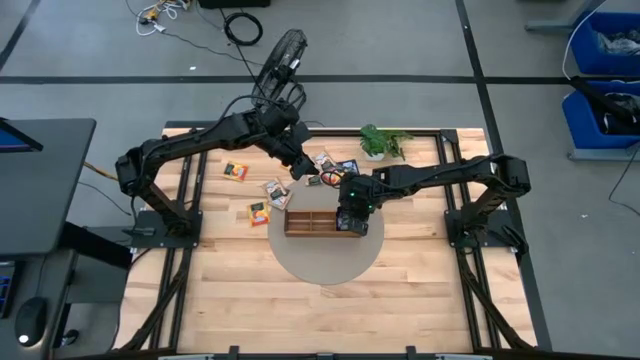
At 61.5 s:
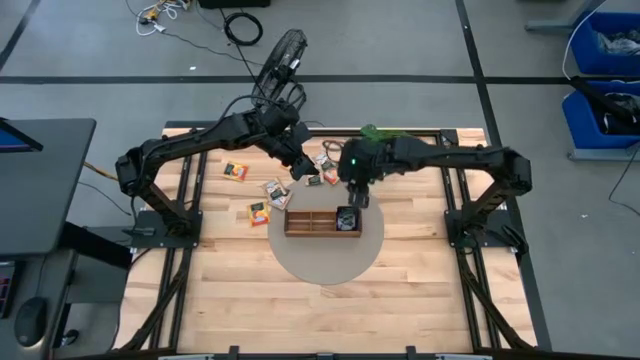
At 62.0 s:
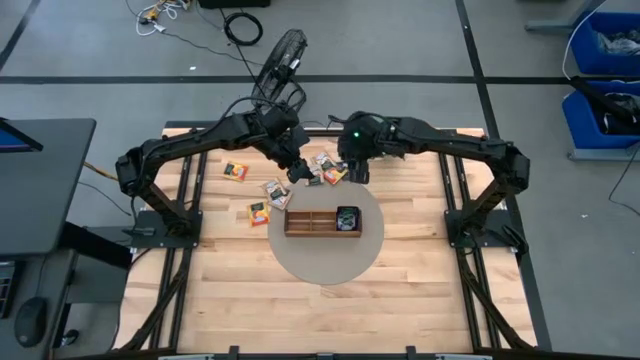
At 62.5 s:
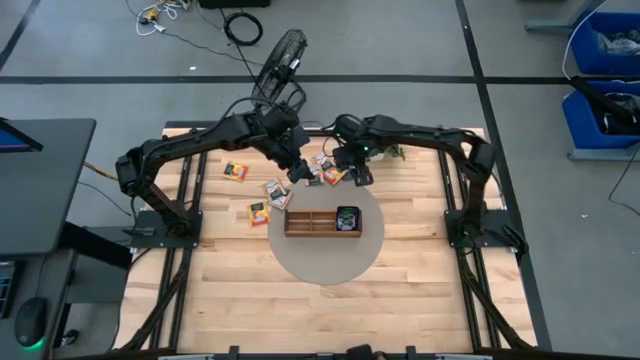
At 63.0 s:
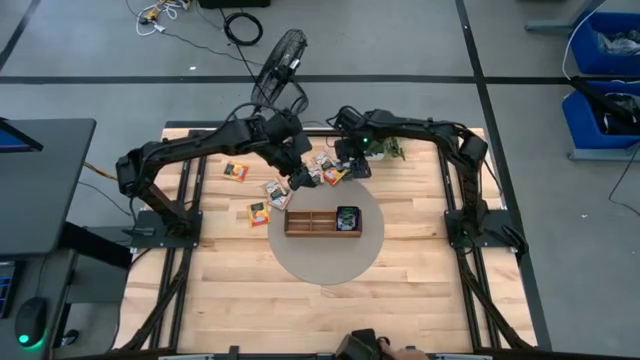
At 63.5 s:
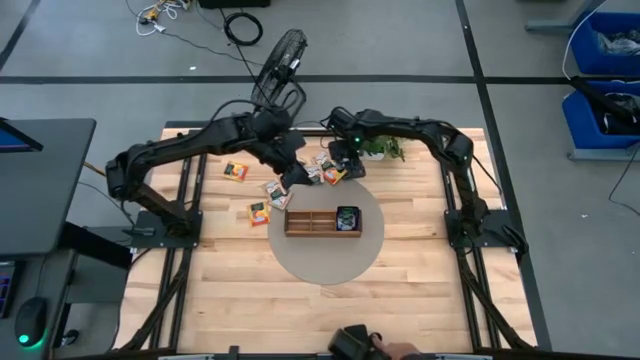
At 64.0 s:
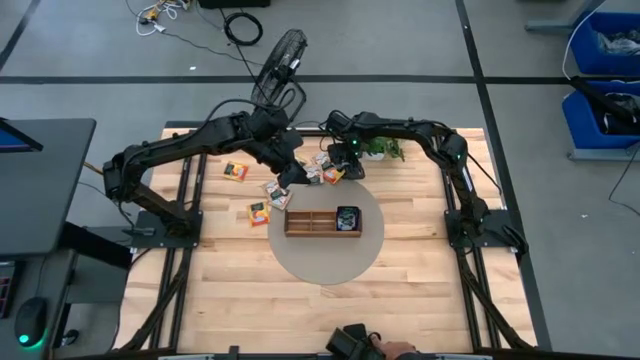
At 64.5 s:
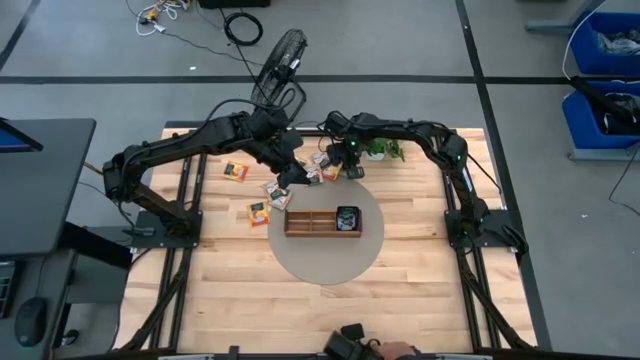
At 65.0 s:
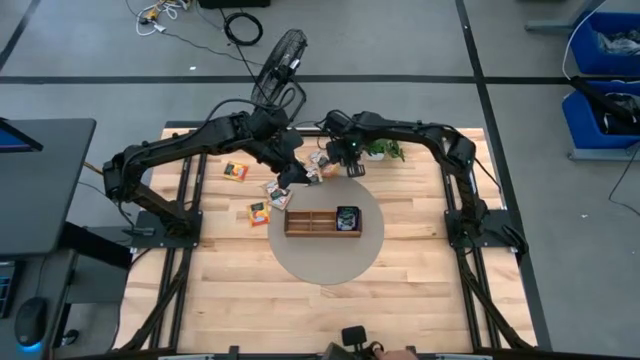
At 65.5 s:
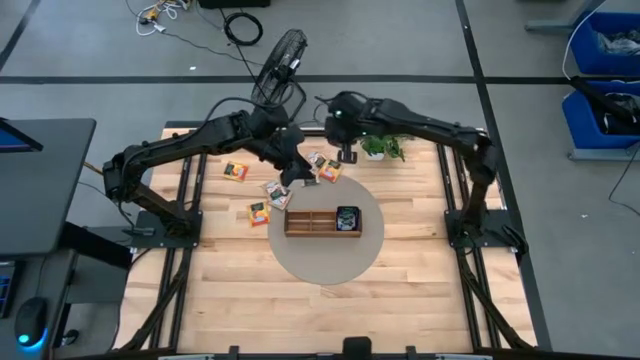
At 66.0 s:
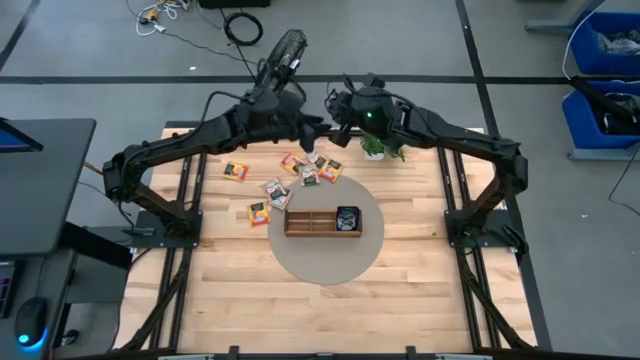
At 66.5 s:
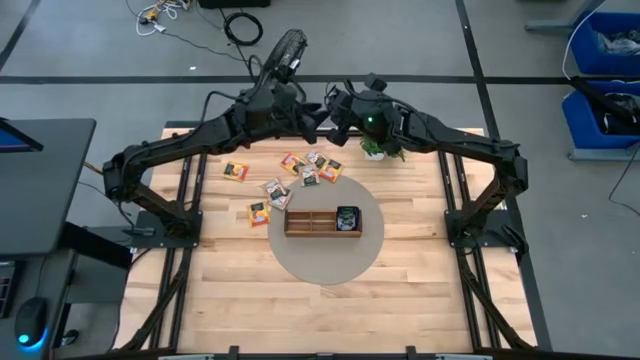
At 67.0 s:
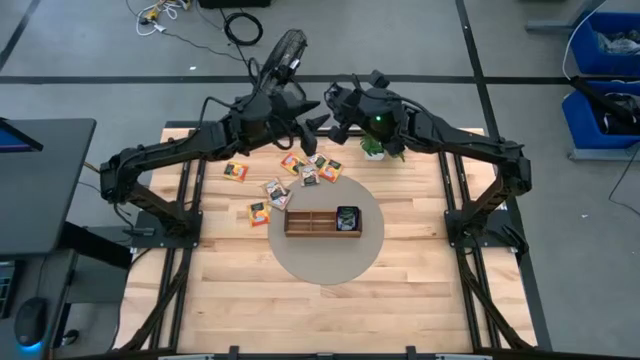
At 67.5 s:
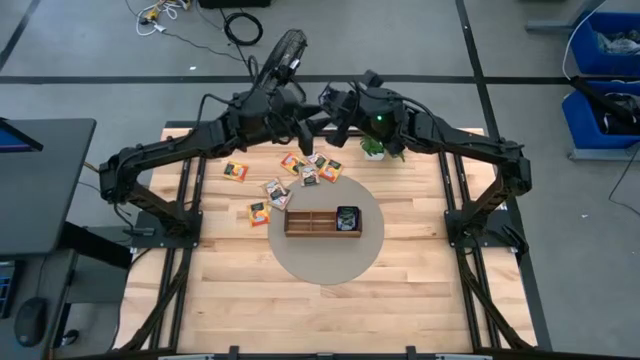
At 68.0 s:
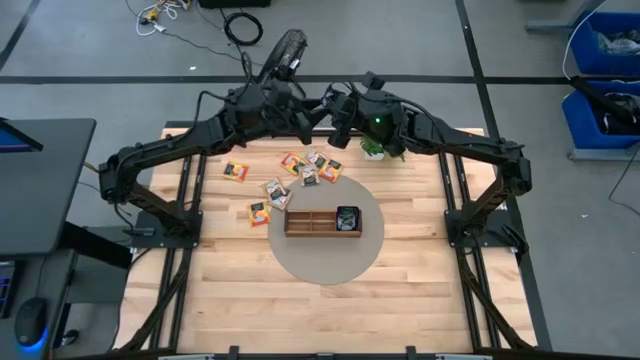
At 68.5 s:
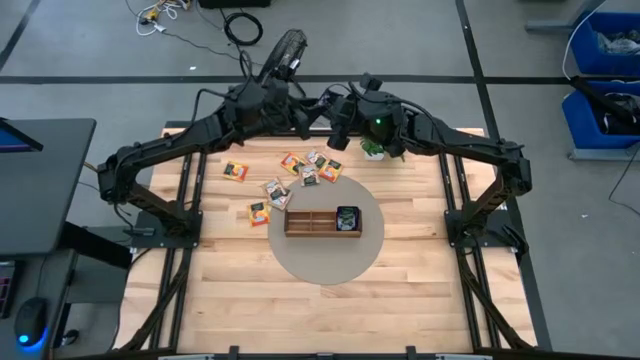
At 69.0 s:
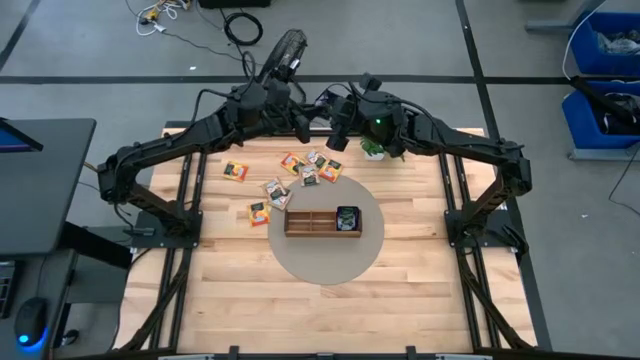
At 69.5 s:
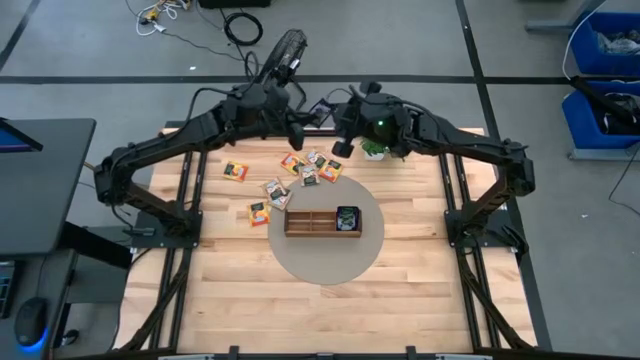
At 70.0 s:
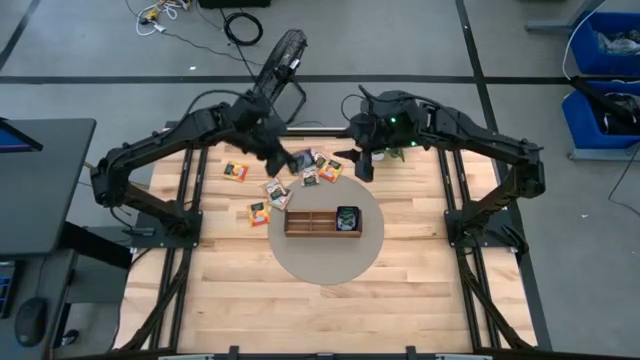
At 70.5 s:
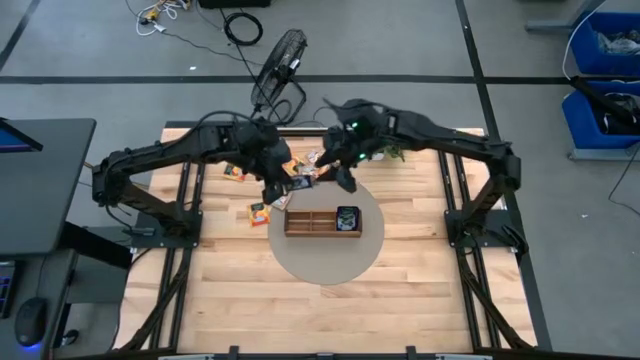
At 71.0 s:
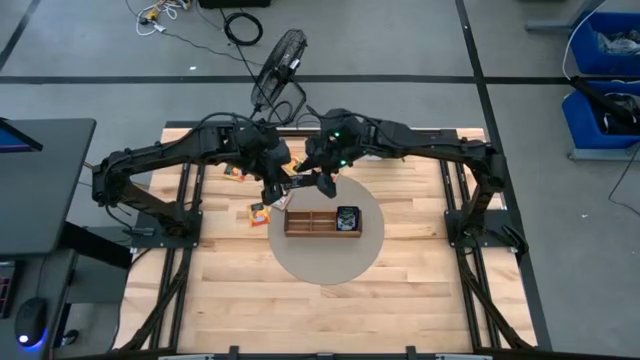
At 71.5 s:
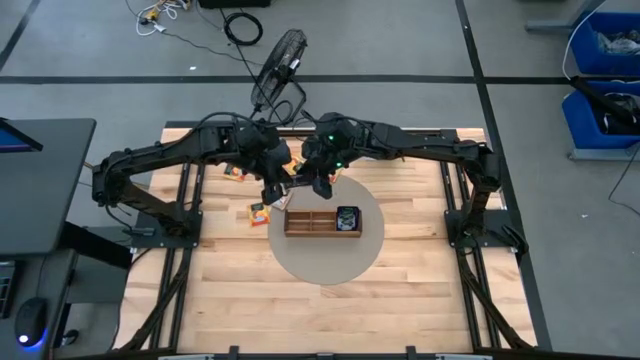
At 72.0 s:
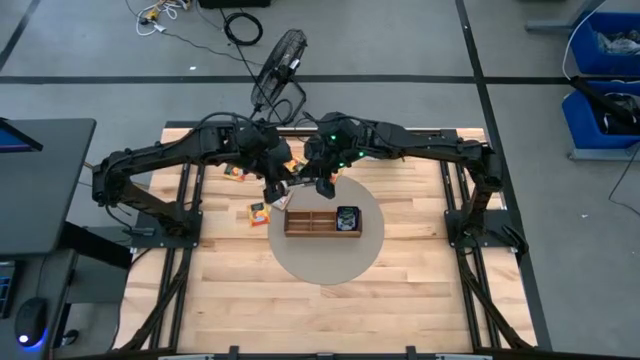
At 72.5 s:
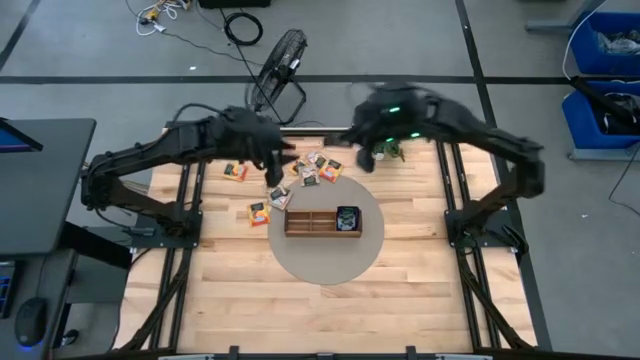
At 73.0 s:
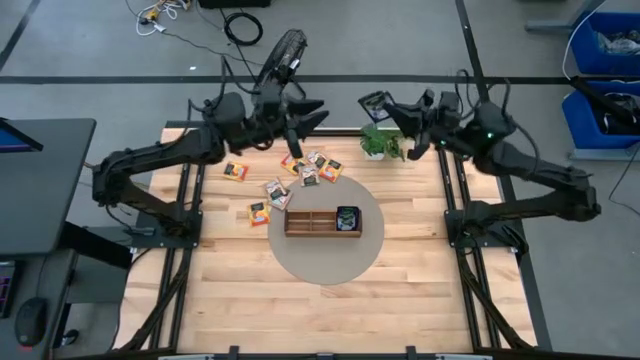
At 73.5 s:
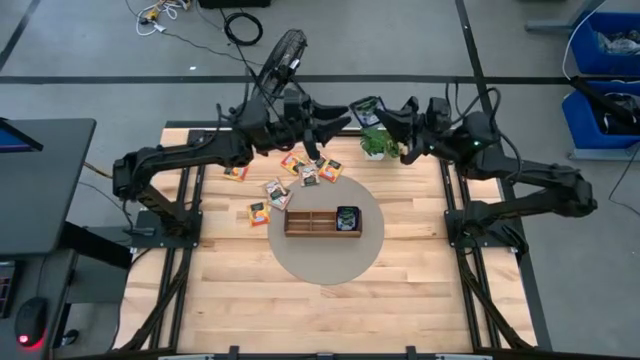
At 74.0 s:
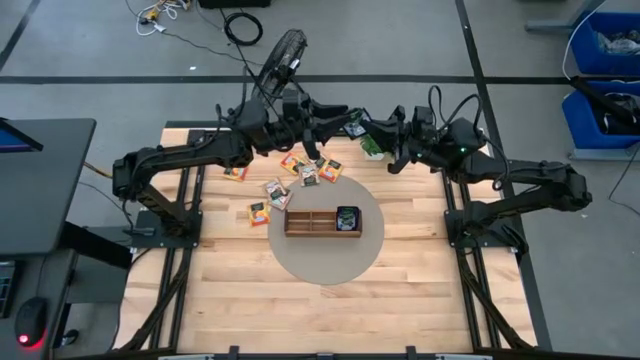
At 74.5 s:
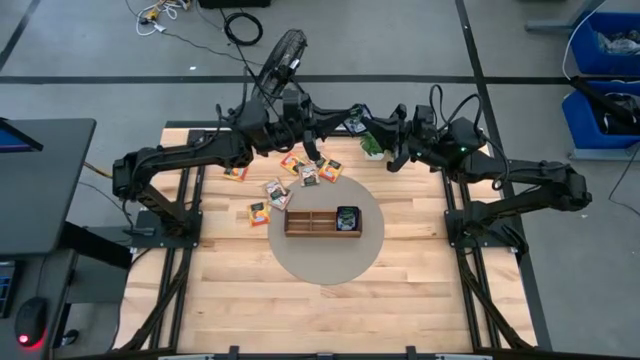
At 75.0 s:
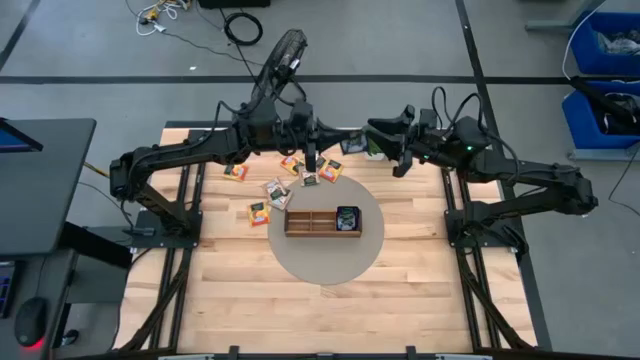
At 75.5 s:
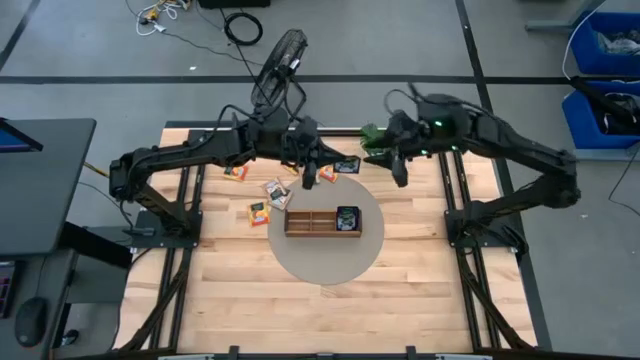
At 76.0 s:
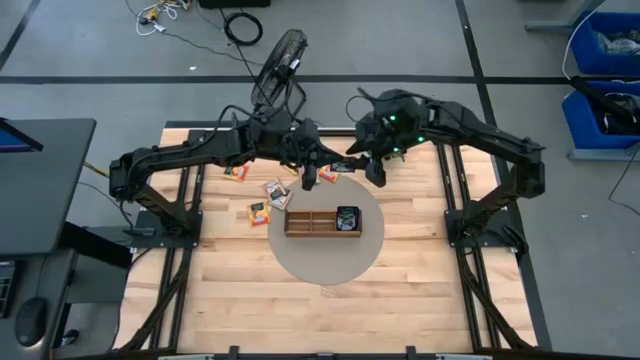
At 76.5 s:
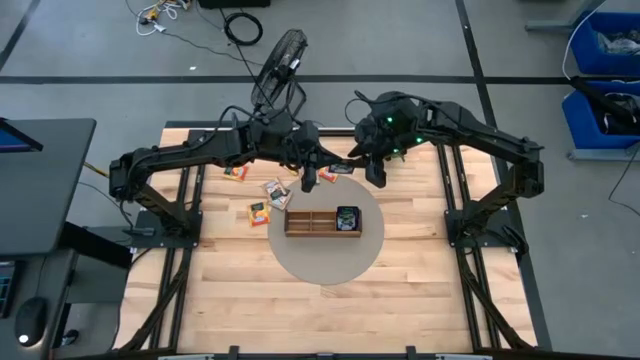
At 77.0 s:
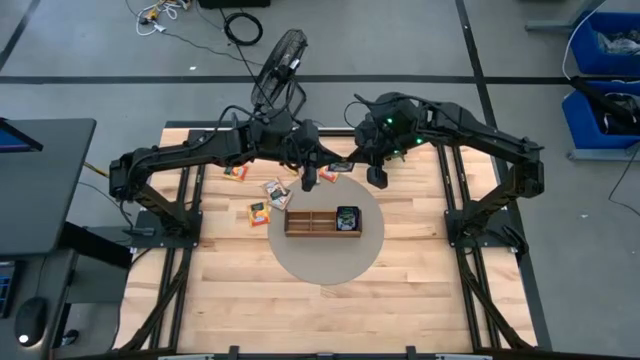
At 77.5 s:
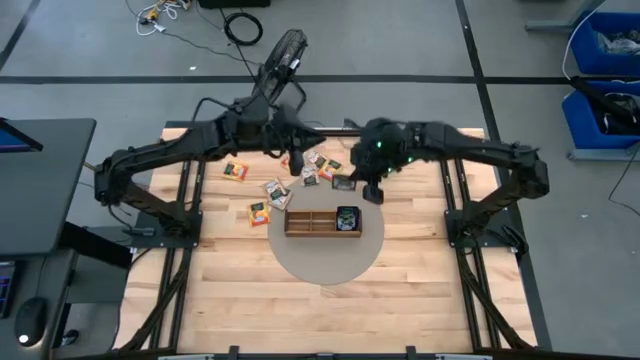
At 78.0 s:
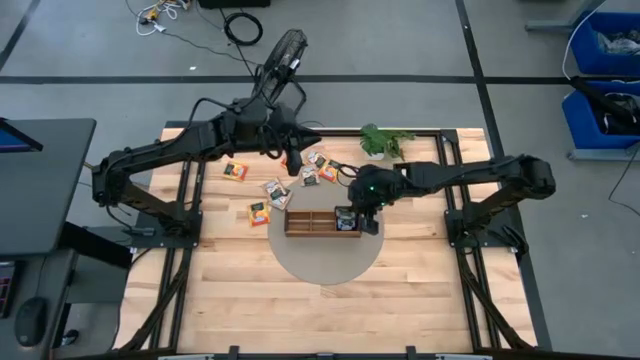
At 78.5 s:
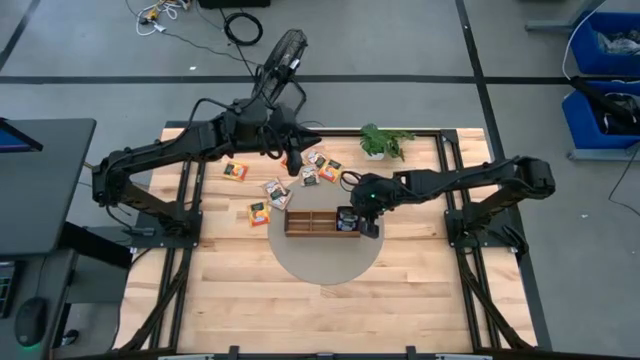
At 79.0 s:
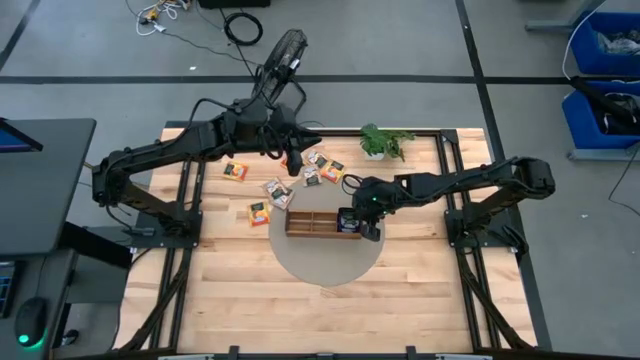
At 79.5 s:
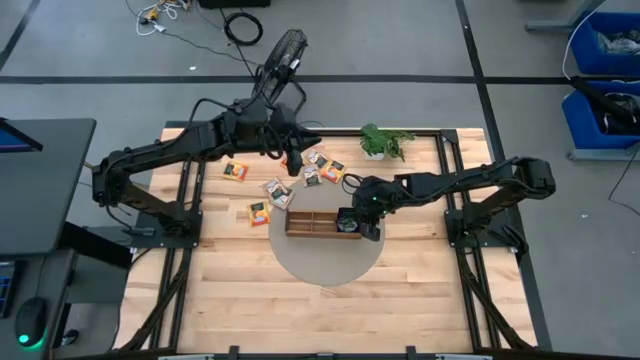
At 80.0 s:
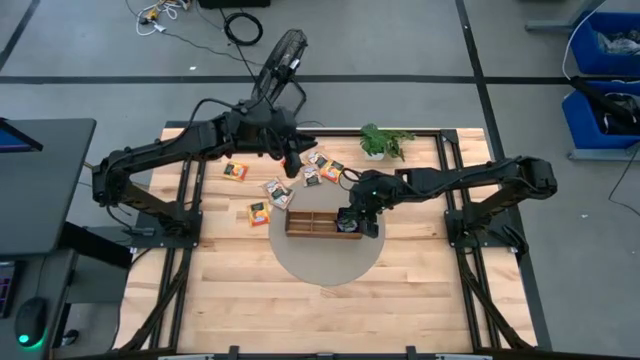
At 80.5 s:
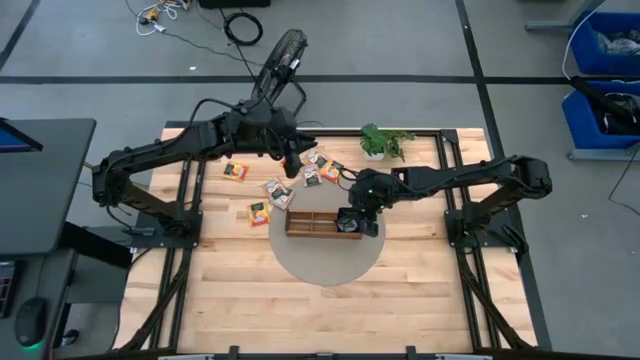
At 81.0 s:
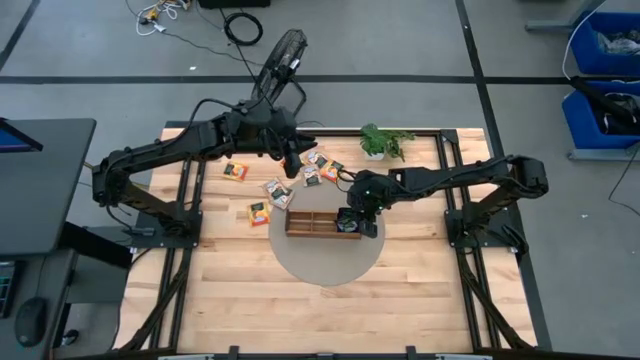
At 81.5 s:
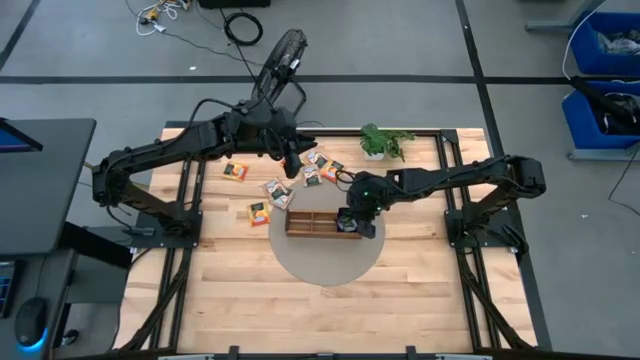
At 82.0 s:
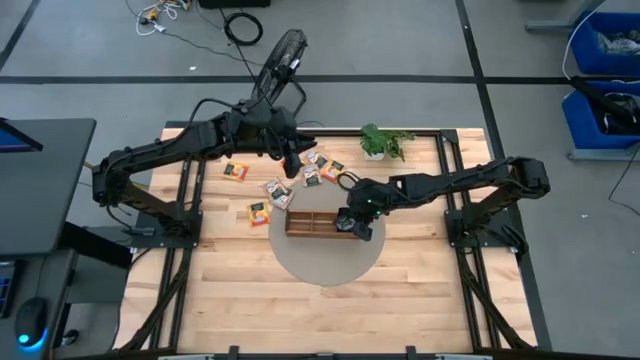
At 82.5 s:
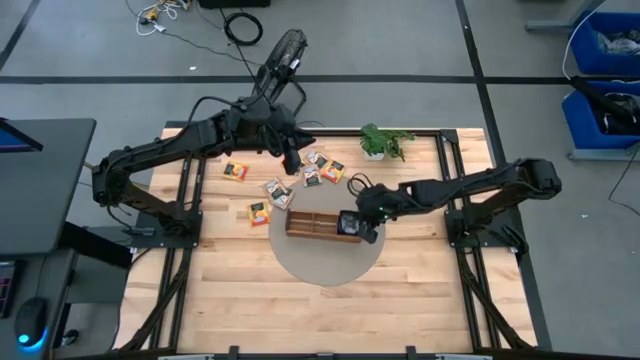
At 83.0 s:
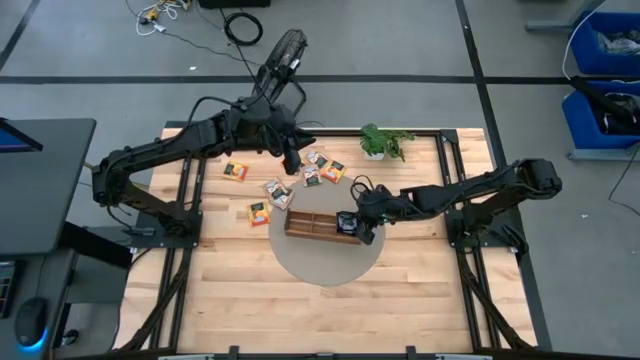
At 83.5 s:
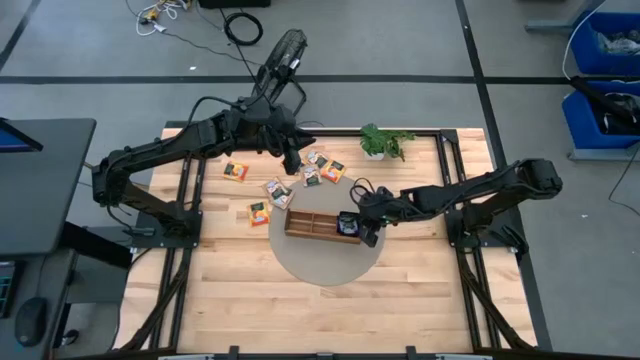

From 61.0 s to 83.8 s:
Task: Pick & Place Tea
Put the blue tea bag into the right section of the wooden organizer
